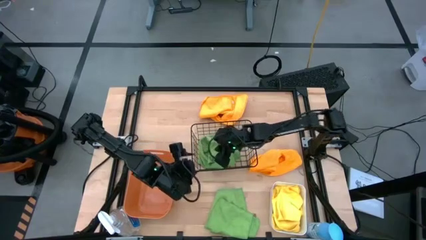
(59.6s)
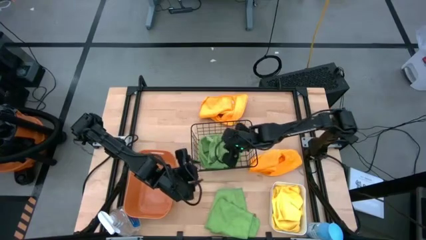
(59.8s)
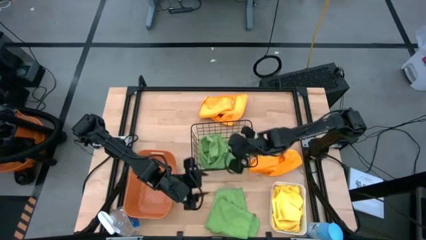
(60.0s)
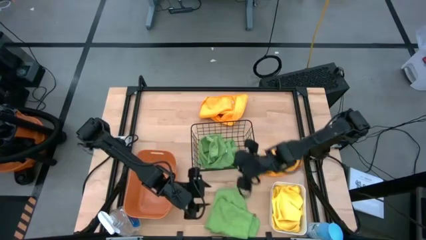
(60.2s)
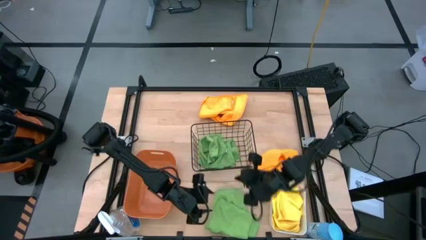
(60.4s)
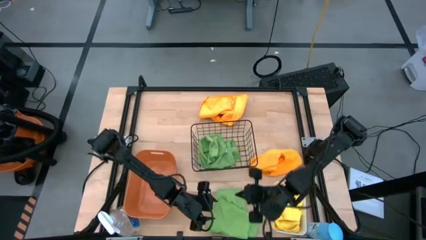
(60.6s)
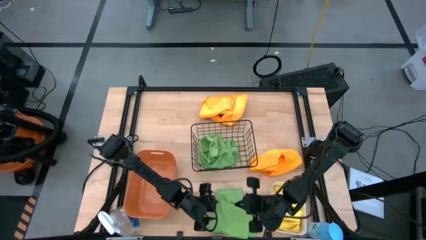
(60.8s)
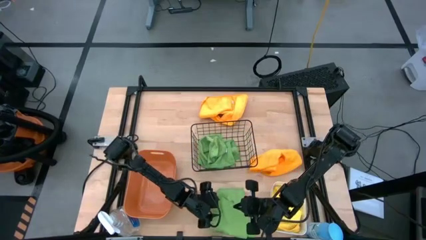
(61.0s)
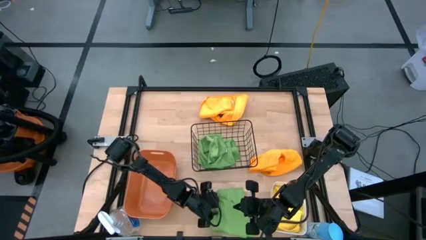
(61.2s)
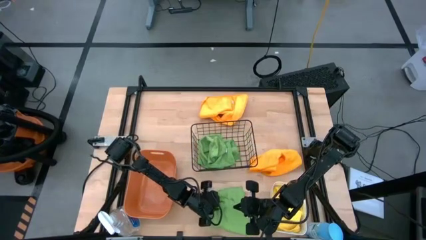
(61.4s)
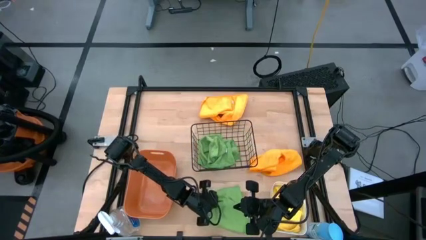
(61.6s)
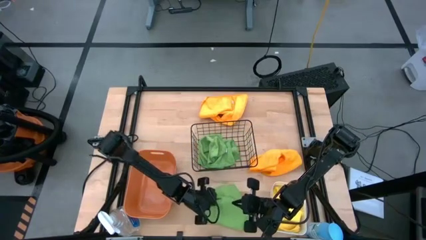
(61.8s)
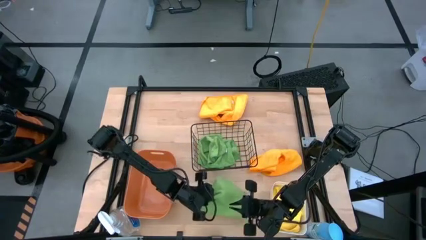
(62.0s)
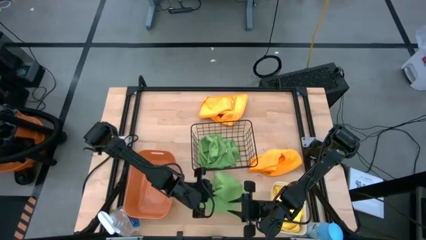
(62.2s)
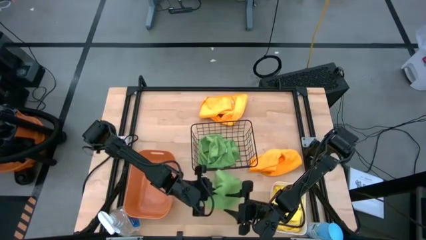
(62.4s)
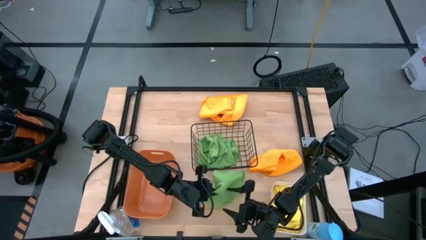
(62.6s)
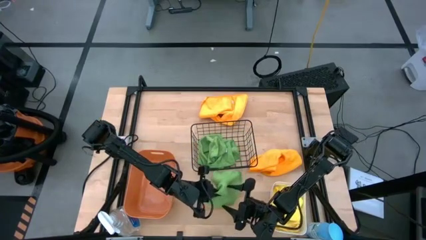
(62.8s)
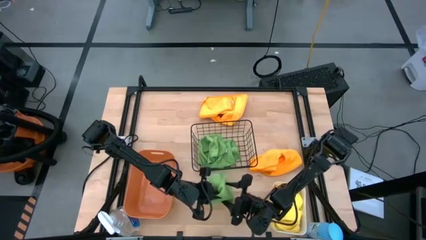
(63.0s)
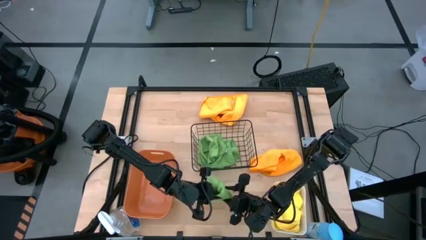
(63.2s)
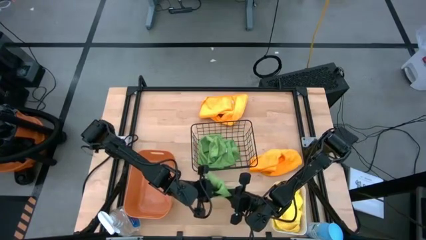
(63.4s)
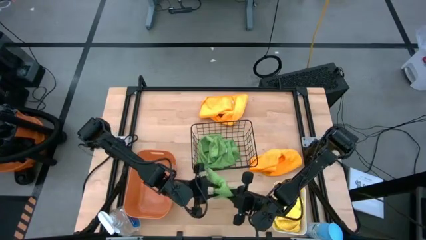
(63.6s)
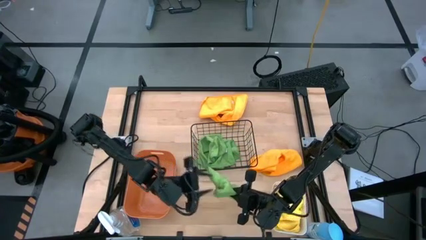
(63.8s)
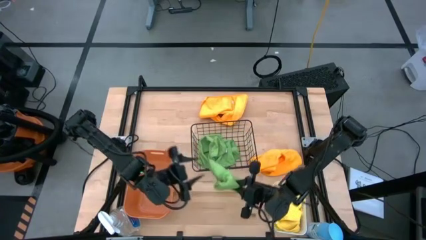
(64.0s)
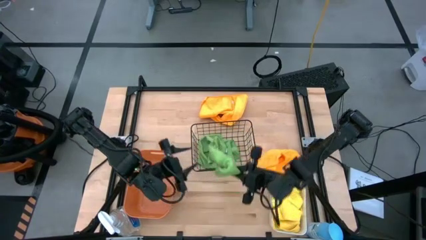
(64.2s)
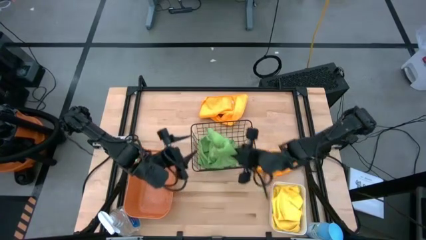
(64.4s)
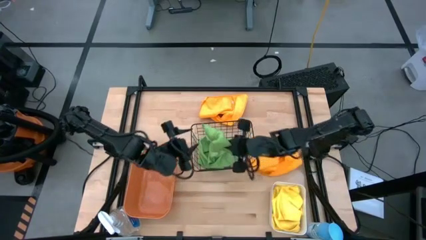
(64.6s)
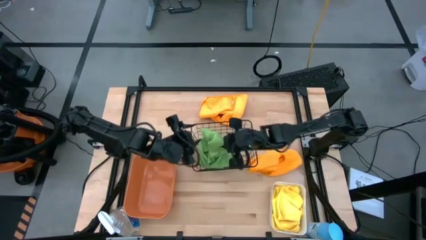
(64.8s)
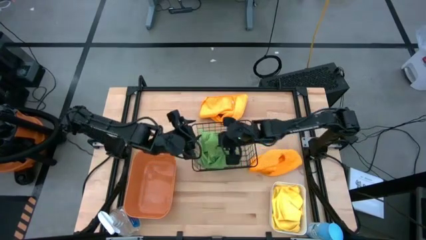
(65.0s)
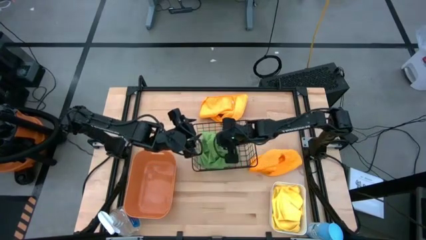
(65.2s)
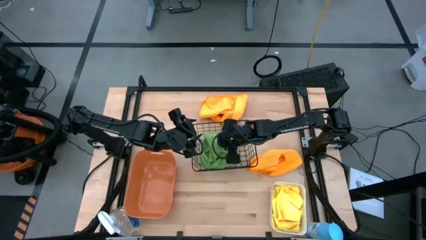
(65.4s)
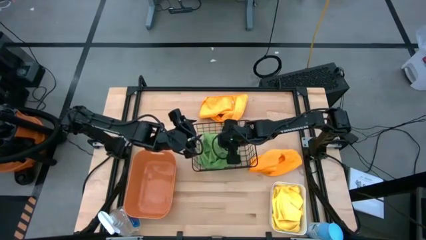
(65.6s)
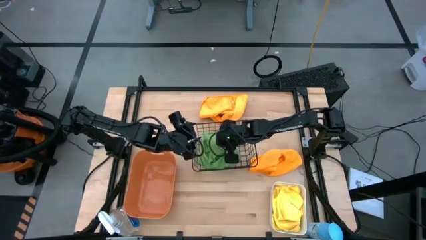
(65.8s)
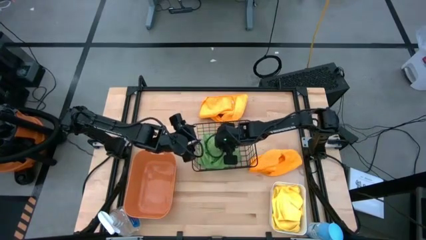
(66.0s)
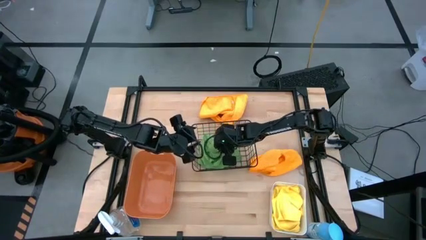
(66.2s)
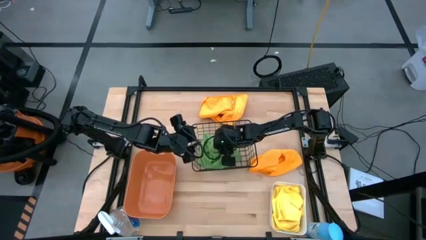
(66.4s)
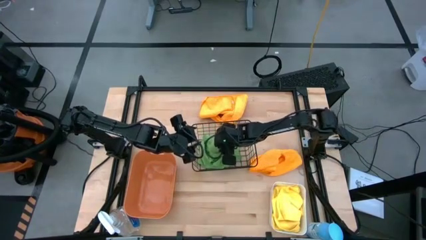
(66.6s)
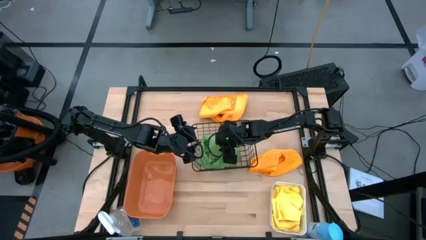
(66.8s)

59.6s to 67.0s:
Task: Sort microfiber towel by color & place in baskets
Put the green microfiber cloth into the black wire basket

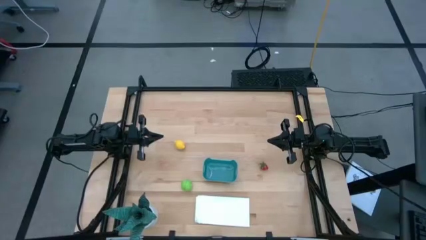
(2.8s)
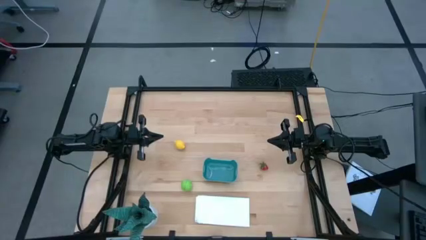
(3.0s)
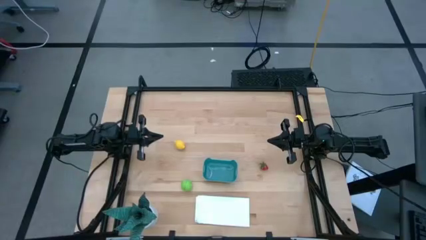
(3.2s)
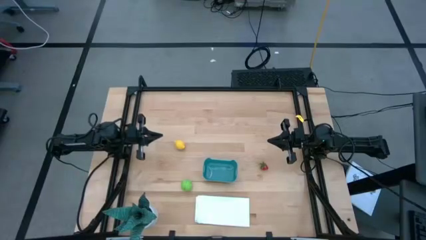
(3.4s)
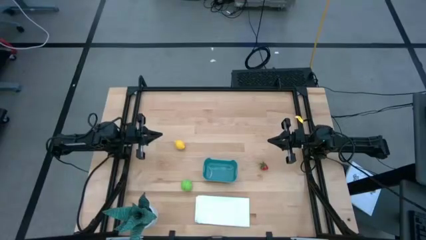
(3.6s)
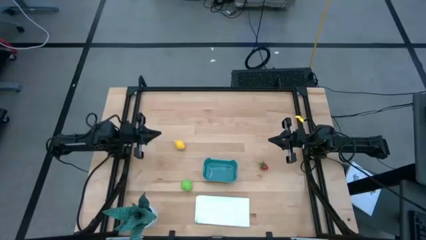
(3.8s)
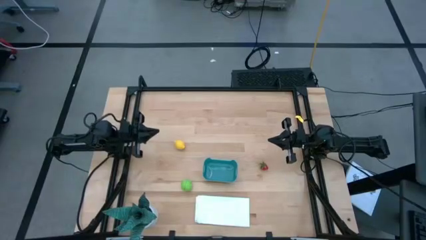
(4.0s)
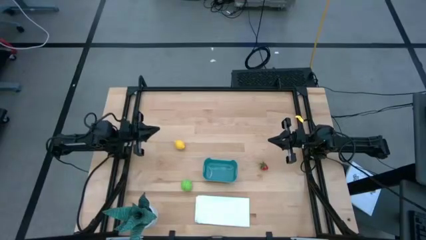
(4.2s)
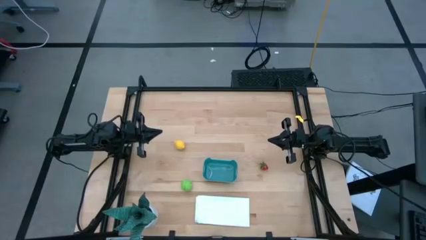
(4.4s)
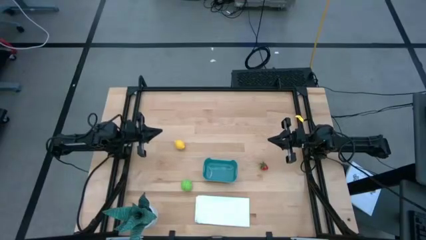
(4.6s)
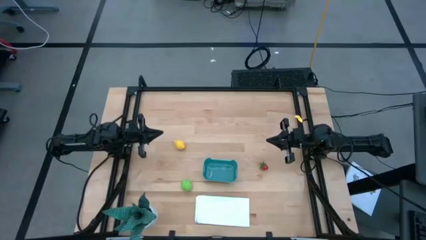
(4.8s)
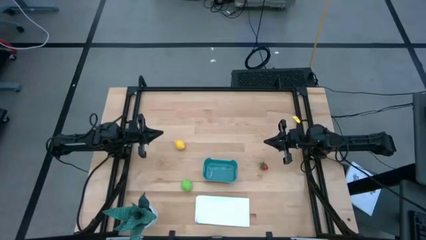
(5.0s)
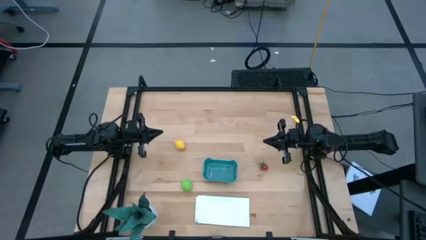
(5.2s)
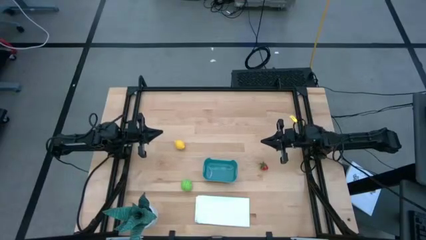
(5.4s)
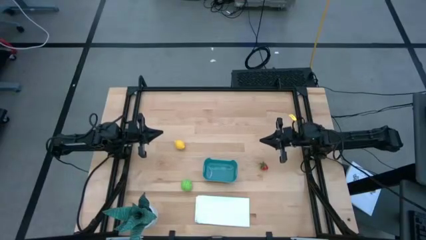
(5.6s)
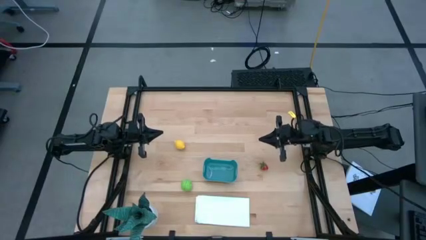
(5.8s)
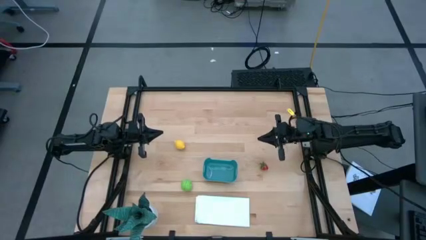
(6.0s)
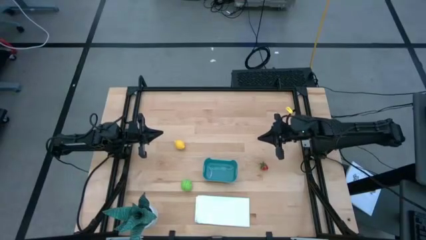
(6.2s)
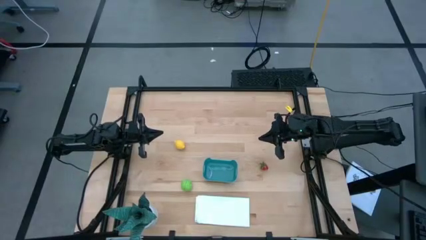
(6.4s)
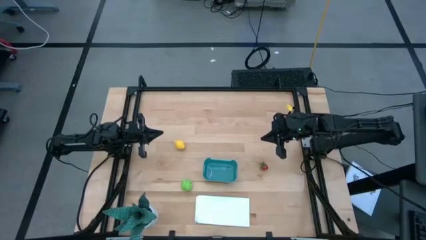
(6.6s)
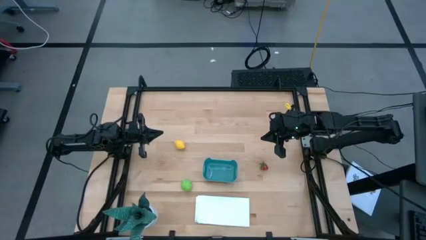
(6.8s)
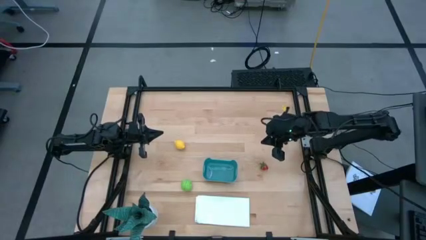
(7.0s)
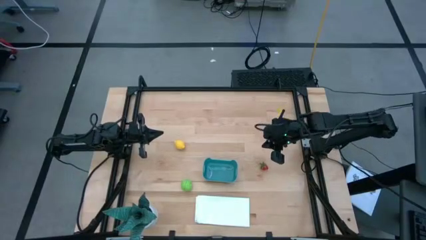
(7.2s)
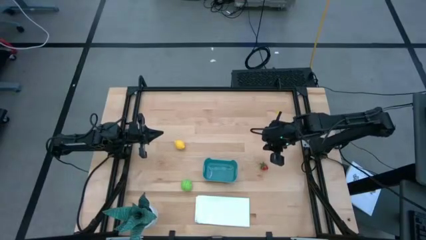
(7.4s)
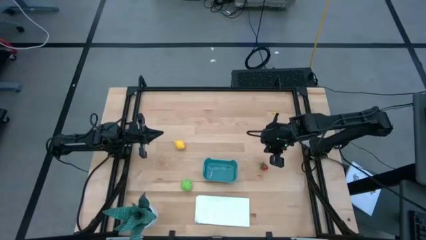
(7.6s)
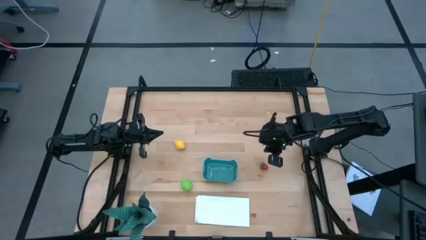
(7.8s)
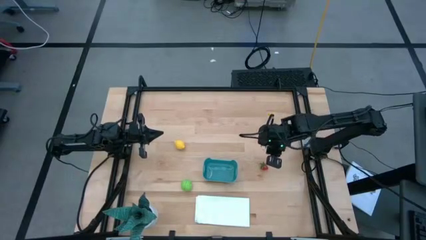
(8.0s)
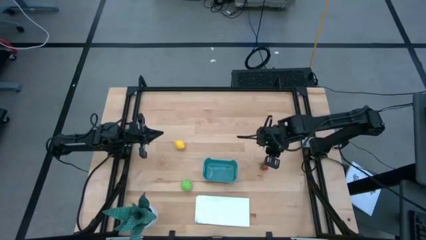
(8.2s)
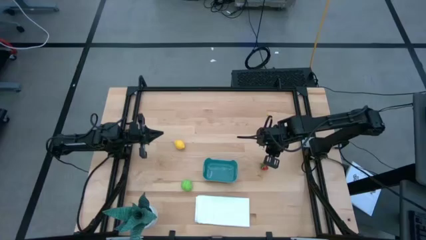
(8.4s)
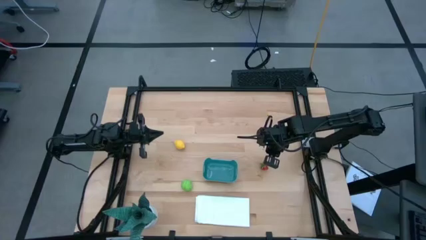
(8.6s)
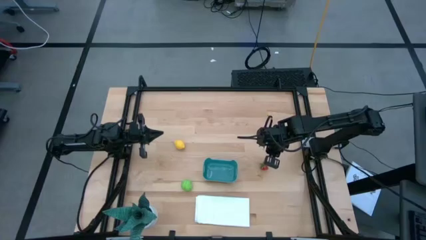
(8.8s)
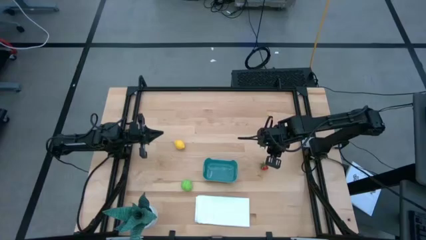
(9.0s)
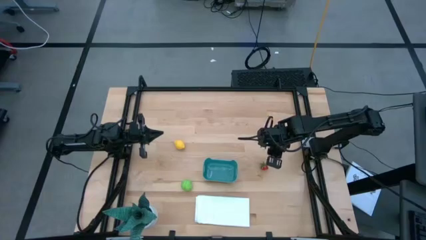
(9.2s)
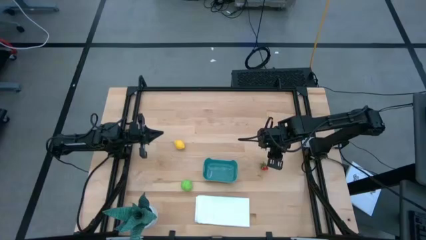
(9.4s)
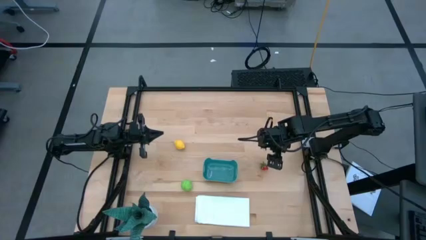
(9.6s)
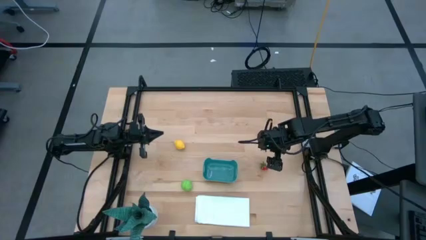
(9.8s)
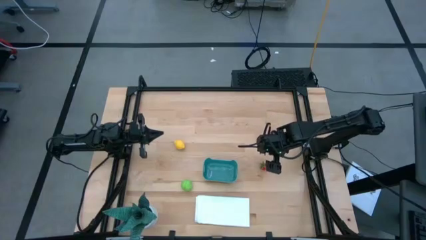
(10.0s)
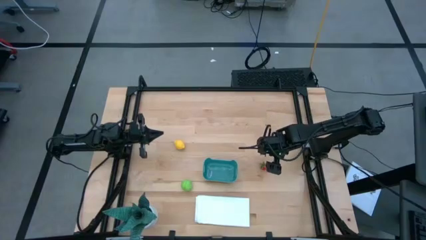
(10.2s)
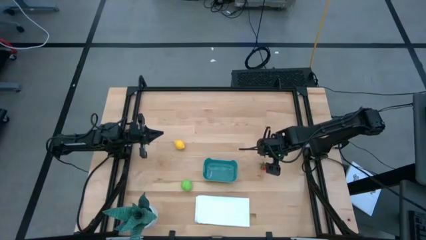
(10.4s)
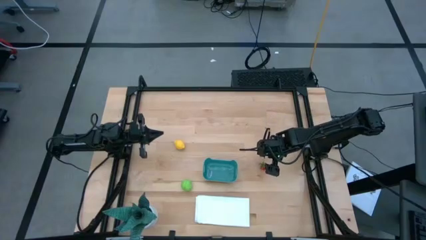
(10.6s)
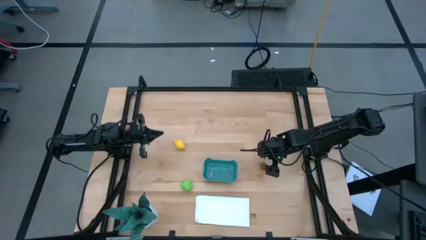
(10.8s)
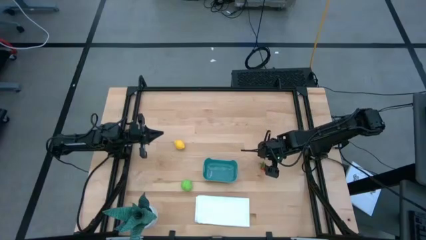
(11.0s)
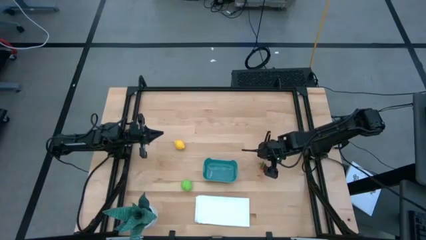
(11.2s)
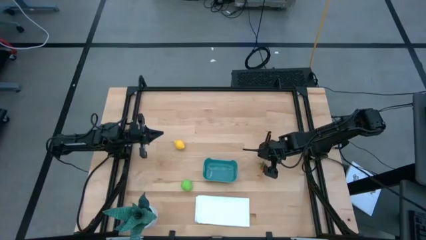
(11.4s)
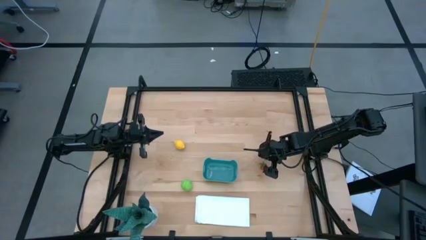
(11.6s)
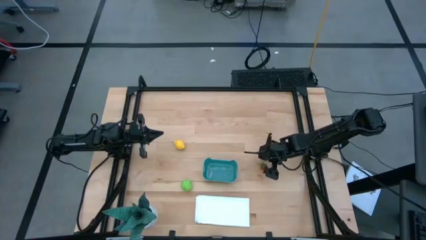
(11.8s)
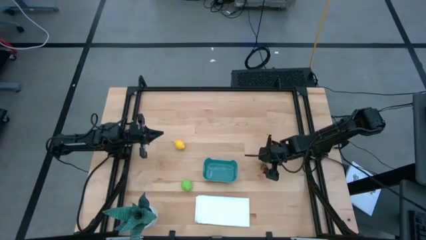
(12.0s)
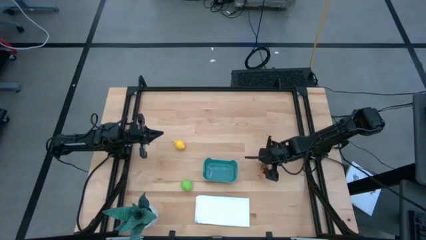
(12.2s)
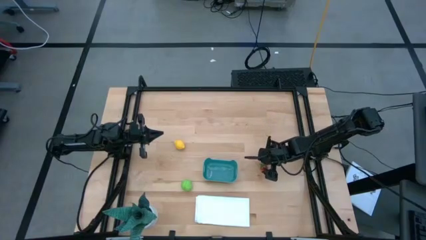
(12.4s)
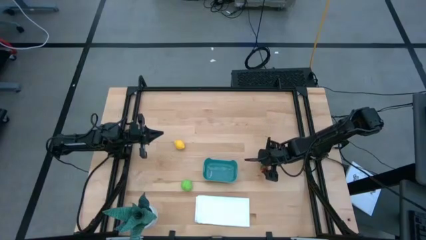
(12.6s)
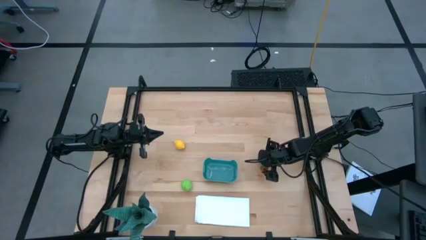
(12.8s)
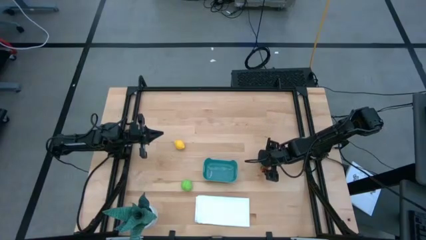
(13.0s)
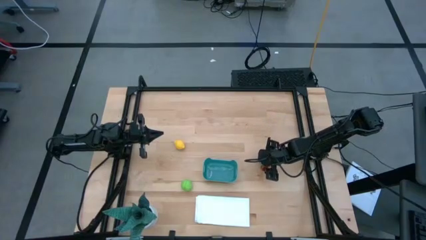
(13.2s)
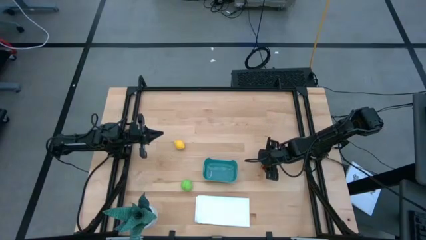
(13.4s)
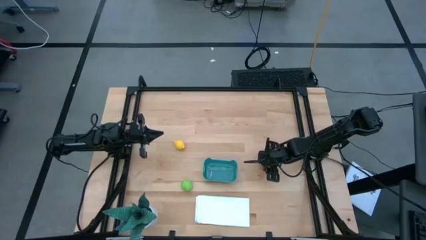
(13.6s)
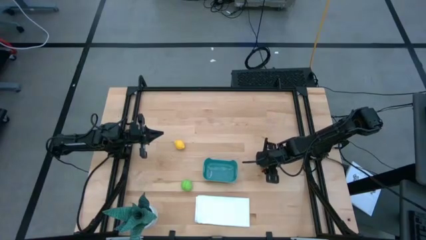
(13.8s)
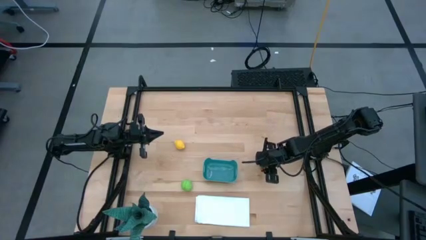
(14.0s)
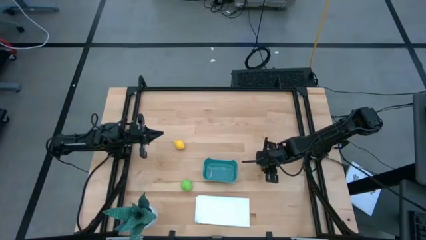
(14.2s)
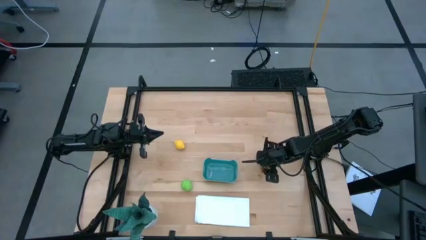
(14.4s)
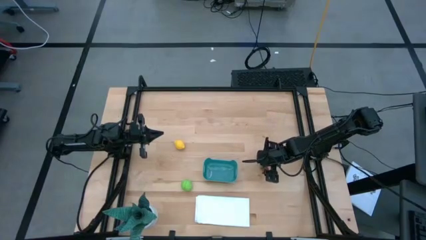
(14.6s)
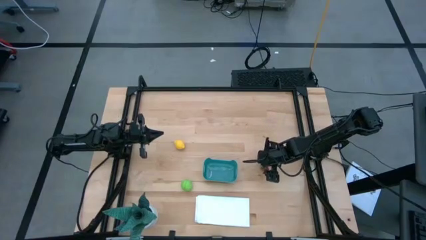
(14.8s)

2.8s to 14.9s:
Task: Pick and placing Produce into tupperware
Put the strawberry into the green bin
